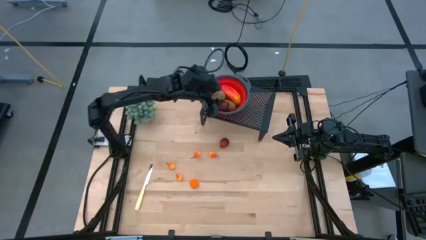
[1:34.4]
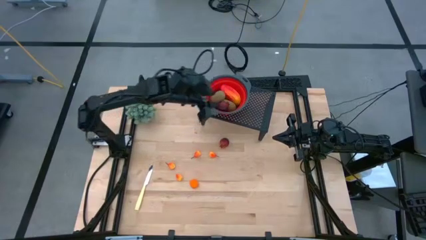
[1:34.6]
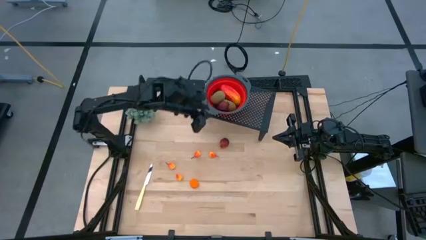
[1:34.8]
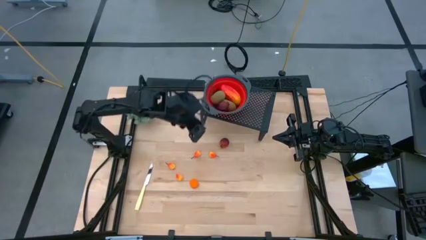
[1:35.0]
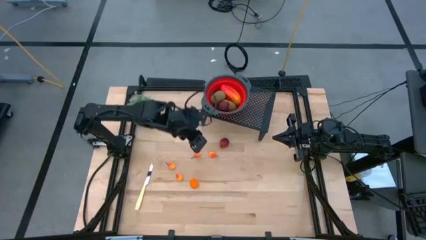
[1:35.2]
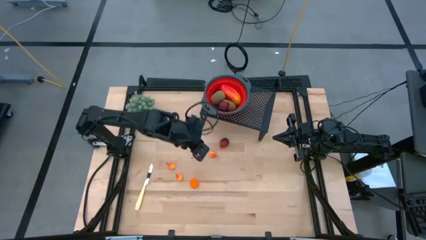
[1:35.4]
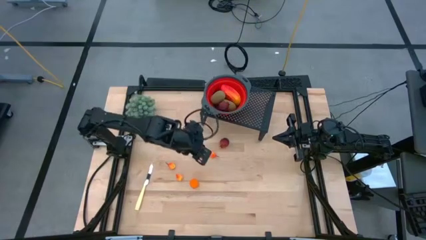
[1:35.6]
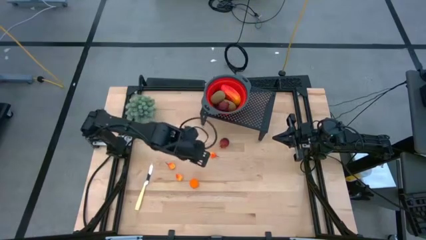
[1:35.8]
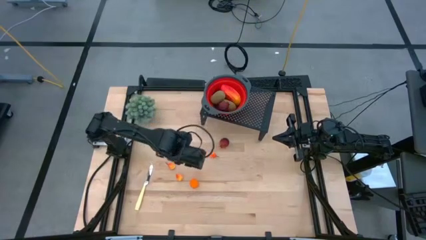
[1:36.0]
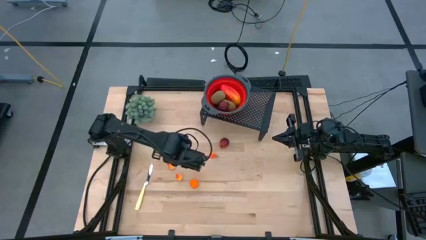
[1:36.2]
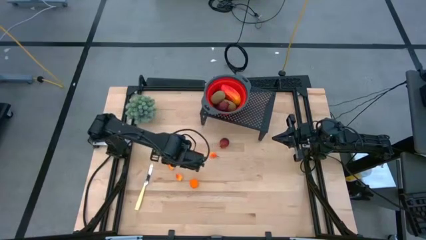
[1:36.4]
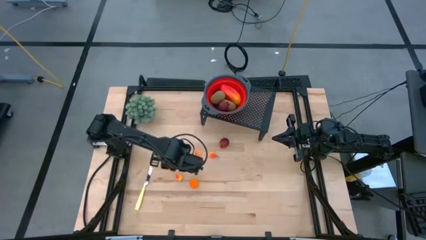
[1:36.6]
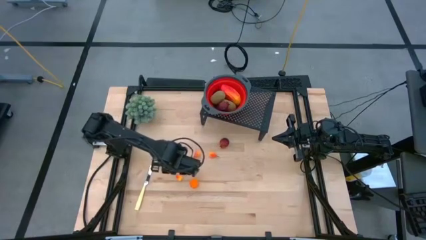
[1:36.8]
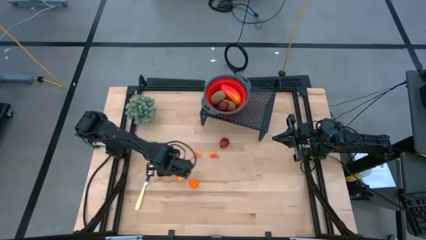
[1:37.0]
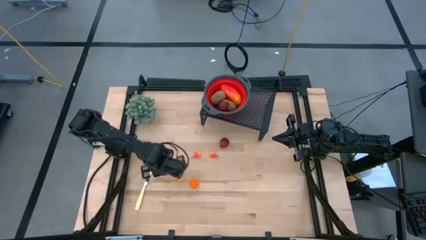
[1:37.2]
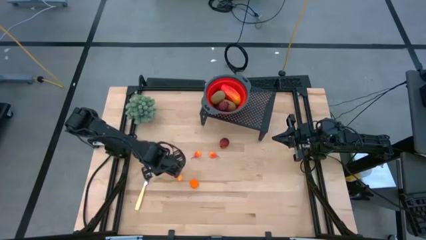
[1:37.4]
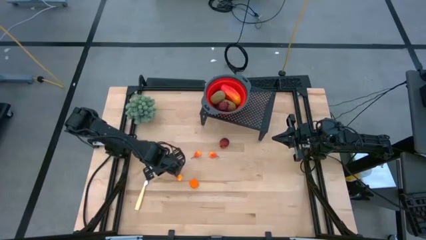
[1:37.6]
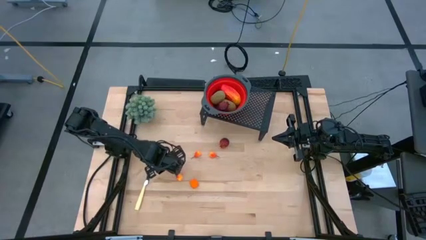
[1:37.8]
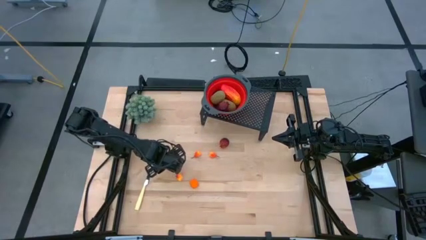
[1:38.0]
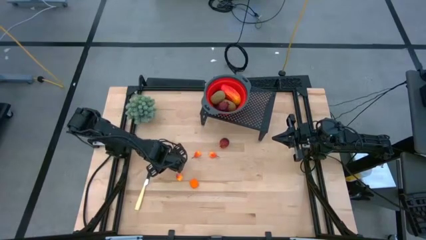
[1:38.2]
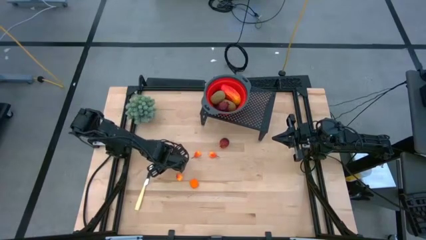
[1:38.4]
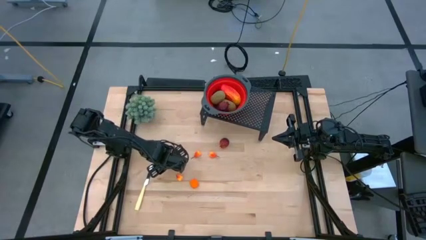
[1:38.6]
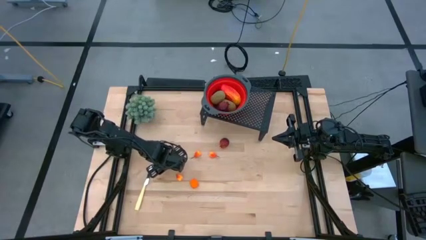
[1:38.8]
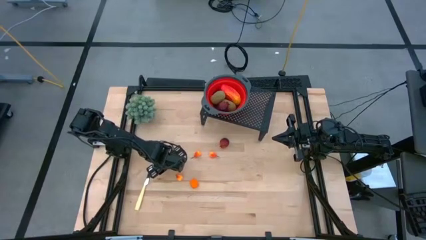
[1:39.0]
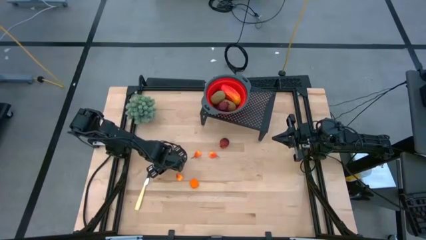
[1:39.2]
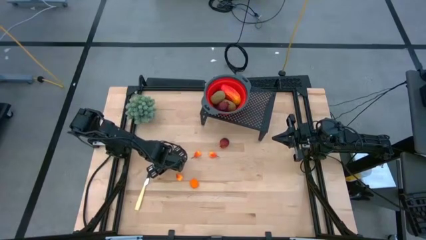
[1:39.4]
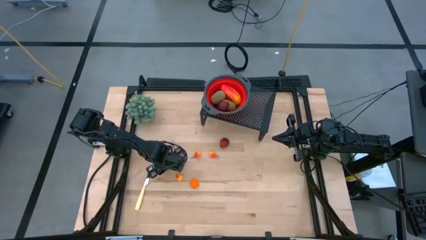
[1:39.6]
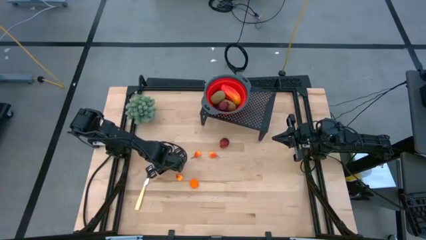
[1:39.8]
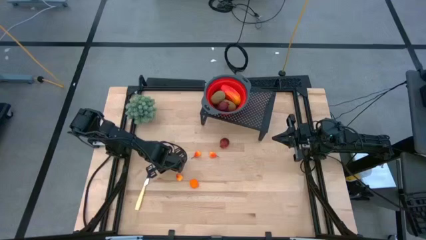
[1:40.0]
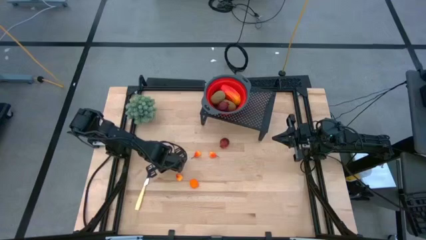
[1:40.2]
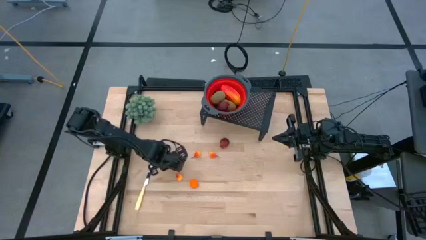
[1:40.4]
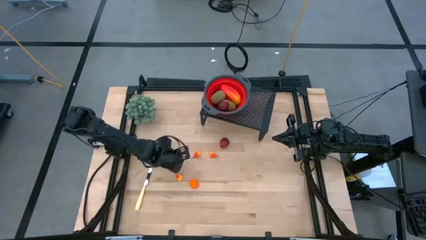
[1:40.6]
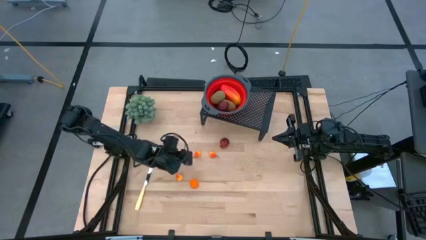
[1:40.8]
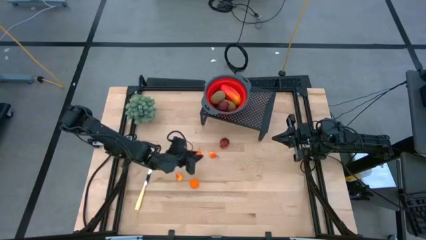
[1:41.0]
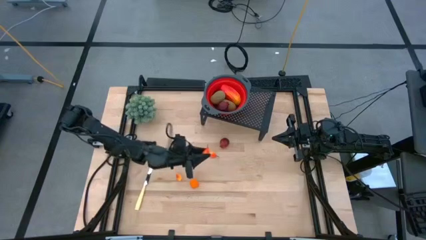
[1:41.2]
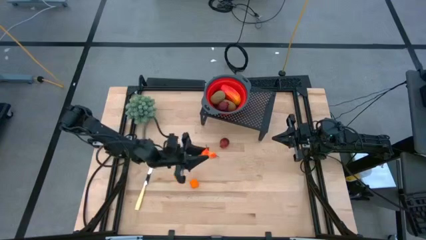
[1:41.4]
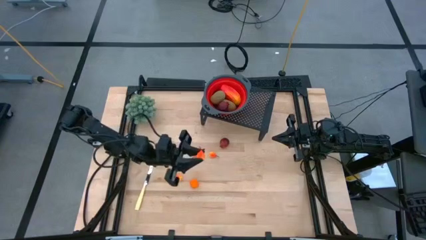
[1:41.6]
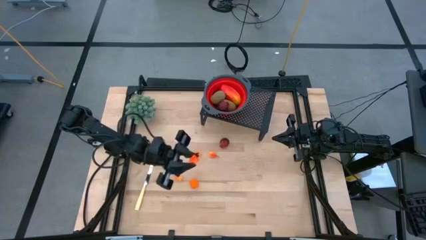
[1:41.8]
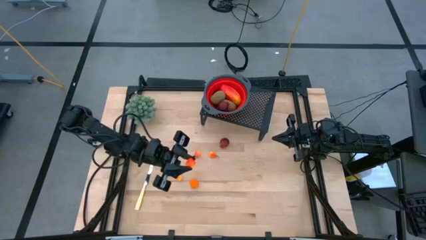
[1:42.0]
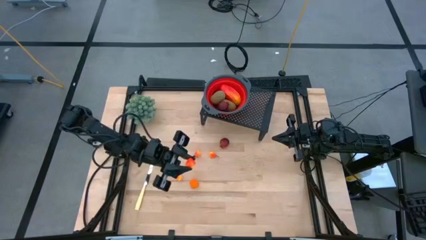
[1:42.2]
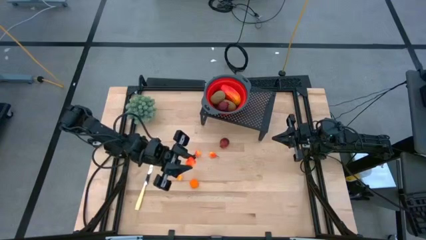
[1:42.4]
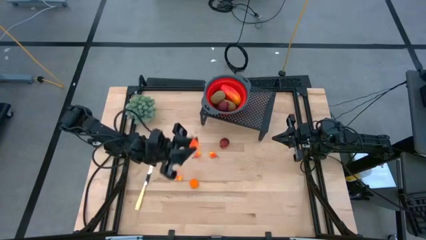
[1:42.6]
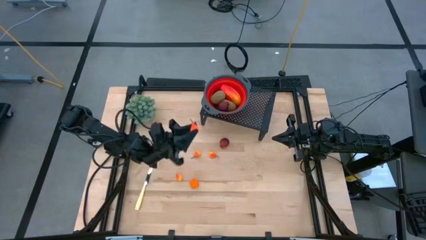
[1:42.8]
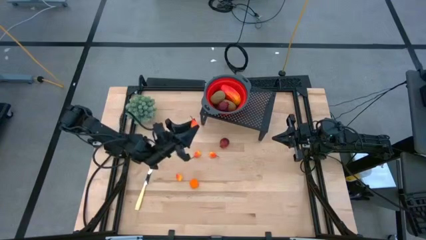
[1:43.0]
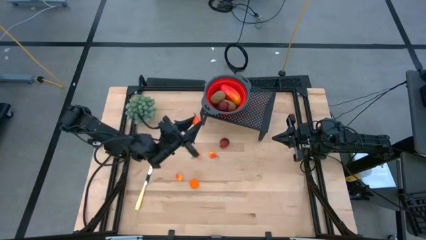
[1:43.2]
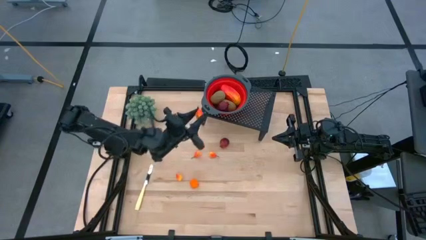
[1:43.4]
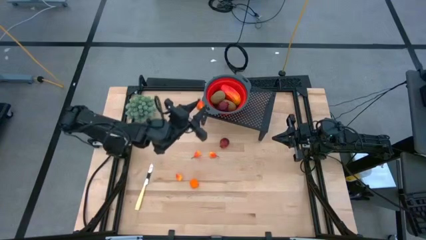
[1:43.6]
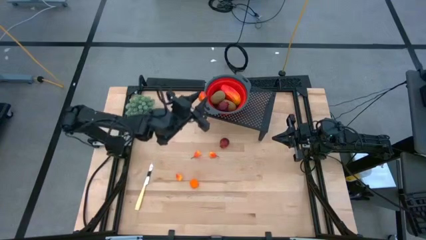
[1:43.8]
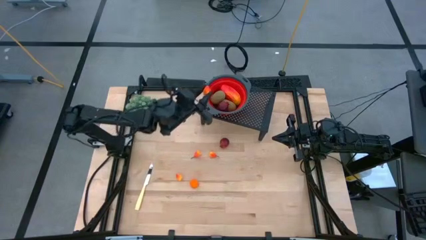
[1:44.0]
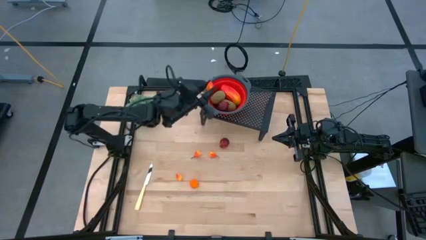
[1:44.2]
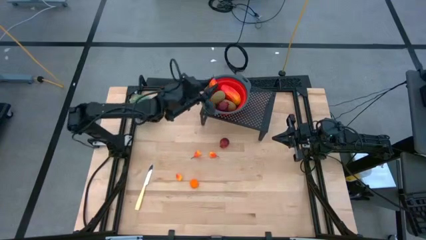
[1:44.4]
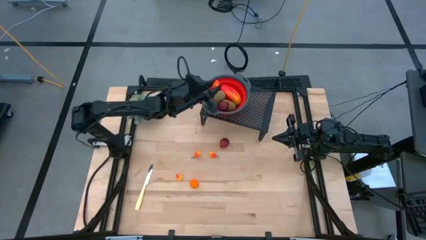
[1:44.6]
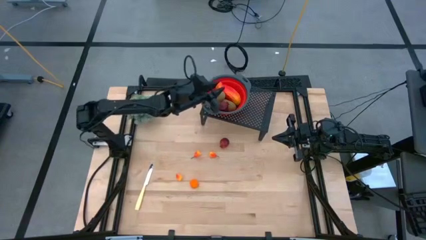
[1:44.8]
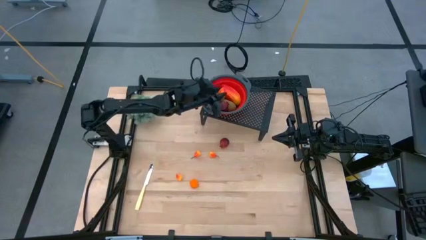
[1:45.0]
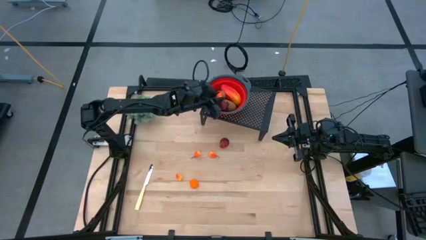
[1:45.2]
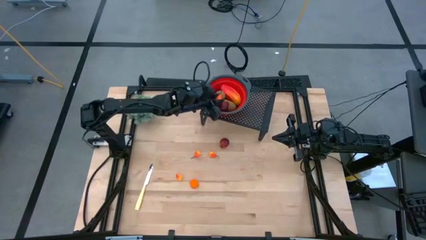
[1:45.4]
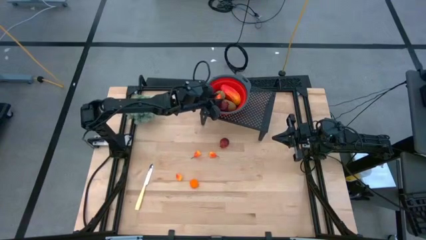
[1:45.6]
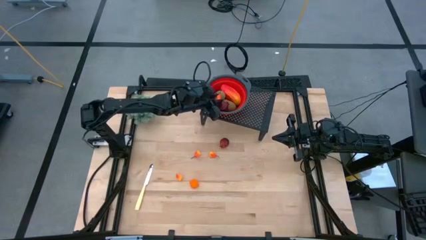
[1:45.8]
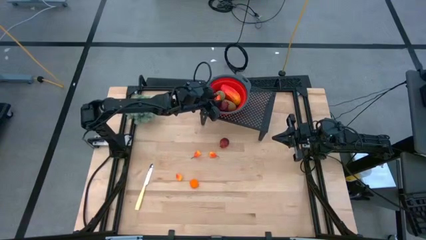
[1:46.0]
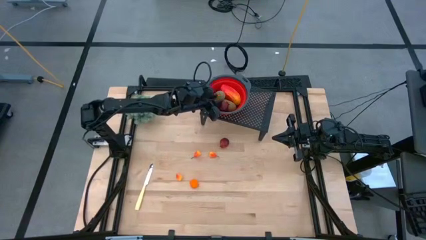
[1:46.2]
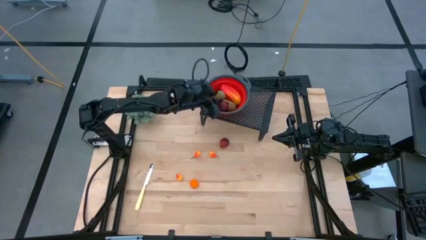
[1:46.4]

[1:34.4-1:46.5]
Task: Pick & Place Fruit
Put the pear into the red strainer bowl on the shelf
